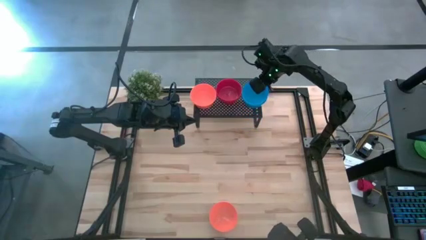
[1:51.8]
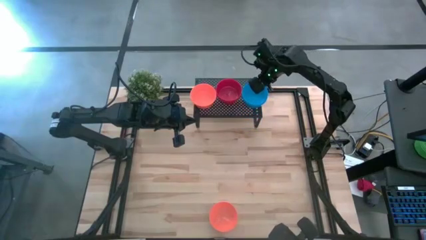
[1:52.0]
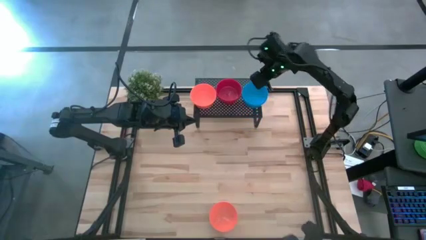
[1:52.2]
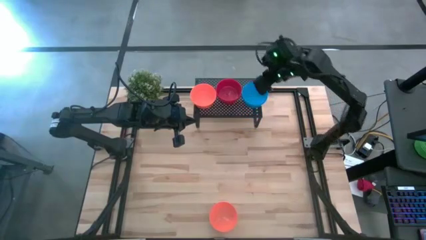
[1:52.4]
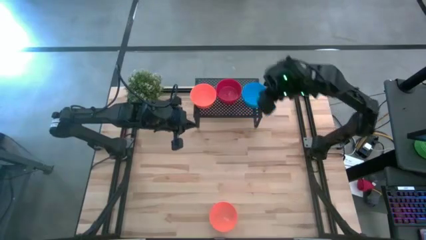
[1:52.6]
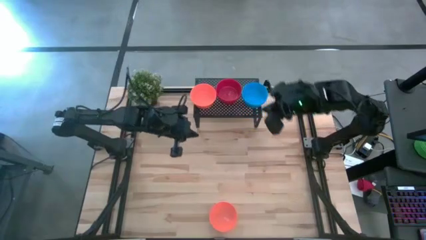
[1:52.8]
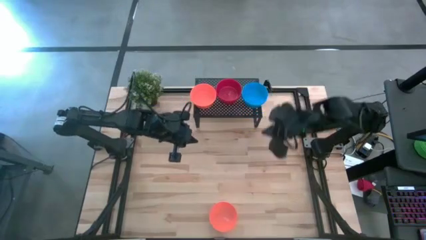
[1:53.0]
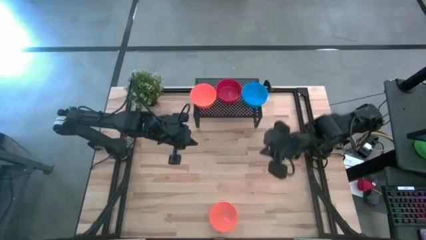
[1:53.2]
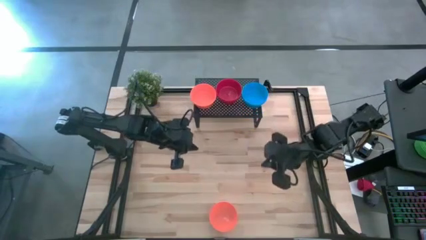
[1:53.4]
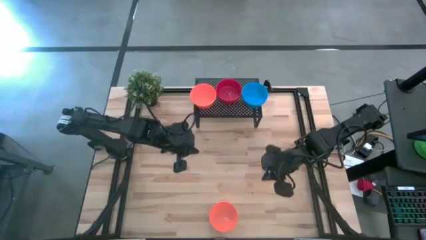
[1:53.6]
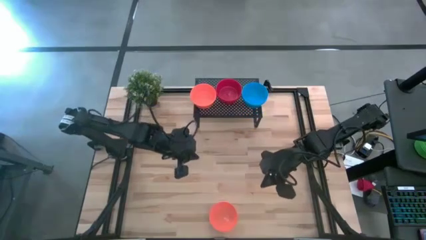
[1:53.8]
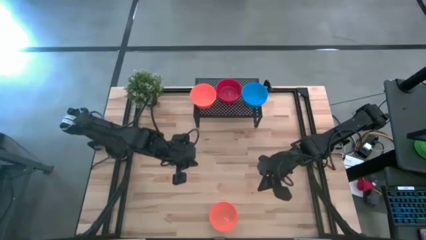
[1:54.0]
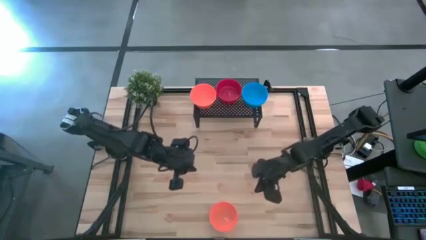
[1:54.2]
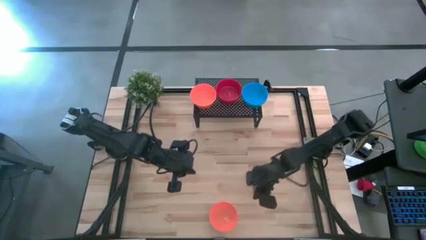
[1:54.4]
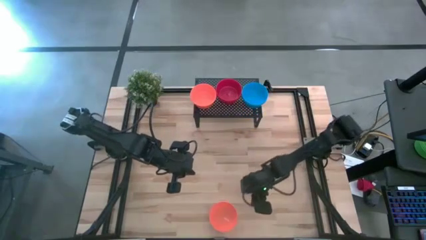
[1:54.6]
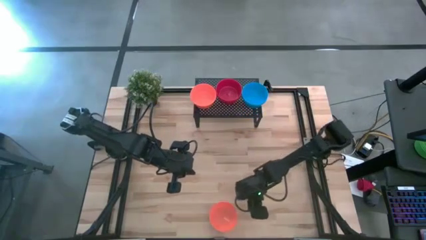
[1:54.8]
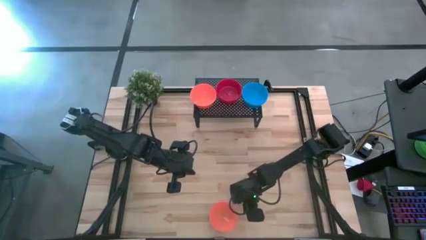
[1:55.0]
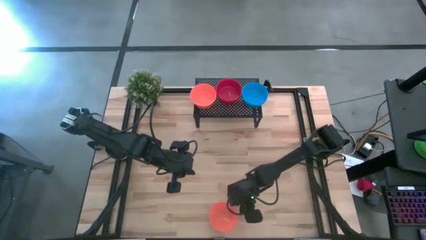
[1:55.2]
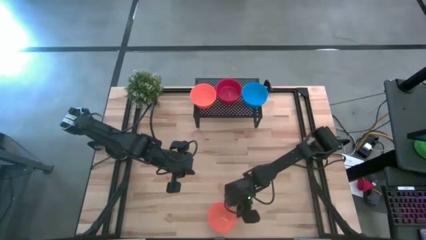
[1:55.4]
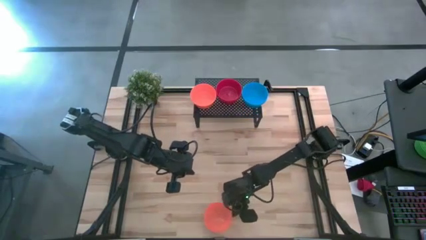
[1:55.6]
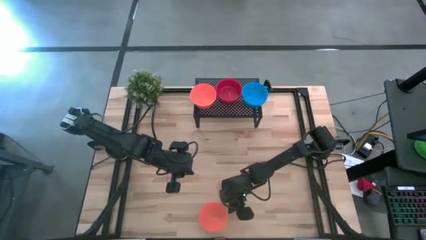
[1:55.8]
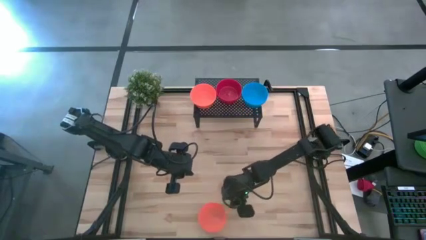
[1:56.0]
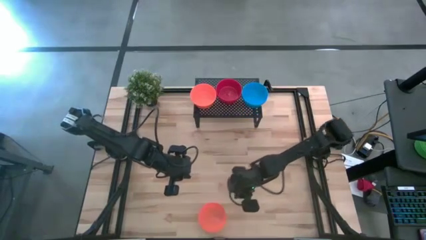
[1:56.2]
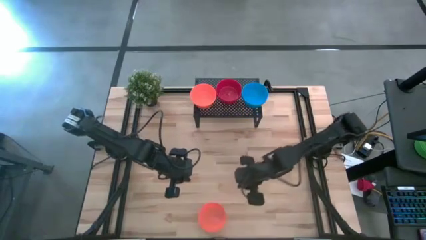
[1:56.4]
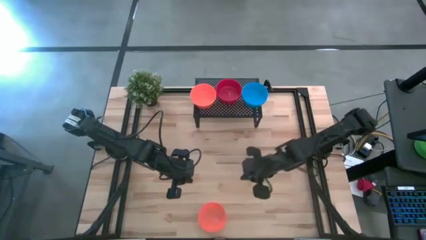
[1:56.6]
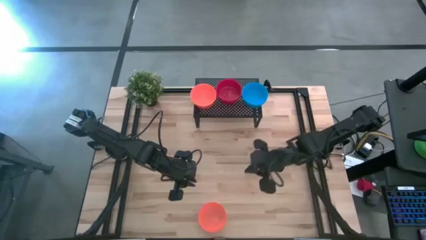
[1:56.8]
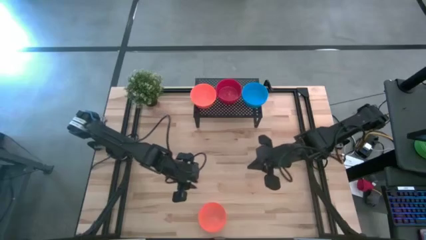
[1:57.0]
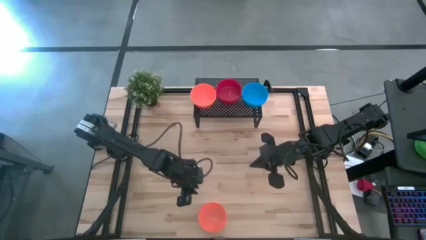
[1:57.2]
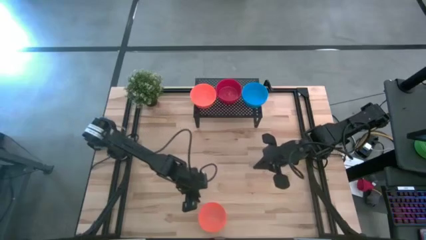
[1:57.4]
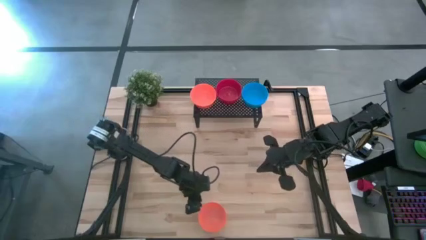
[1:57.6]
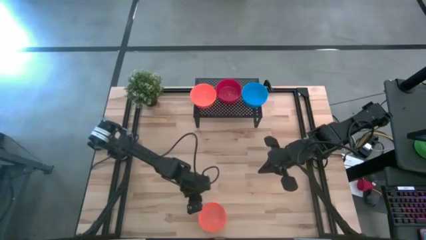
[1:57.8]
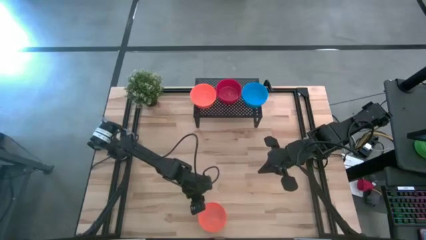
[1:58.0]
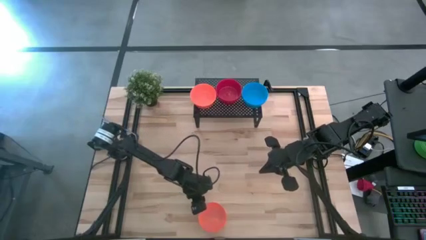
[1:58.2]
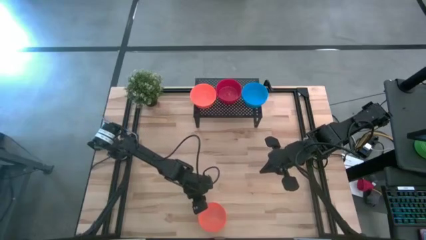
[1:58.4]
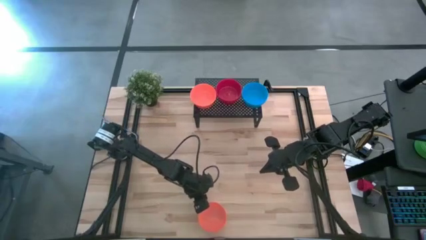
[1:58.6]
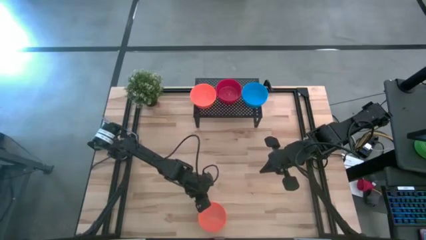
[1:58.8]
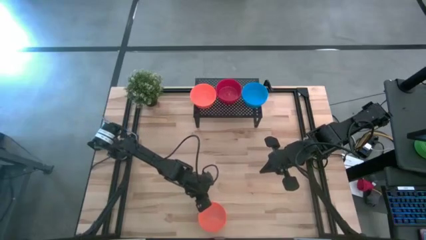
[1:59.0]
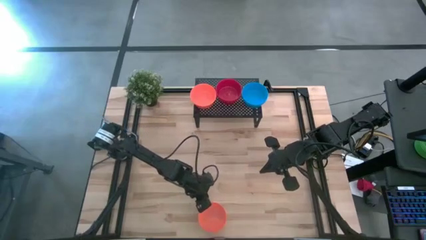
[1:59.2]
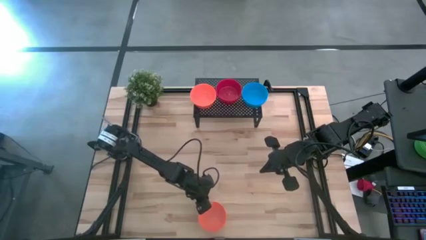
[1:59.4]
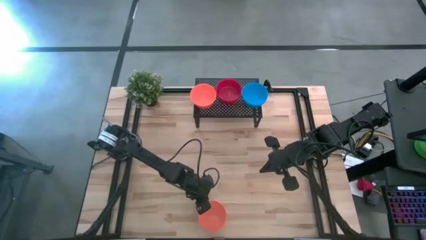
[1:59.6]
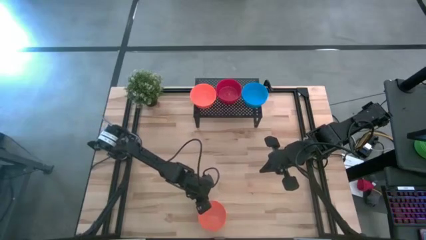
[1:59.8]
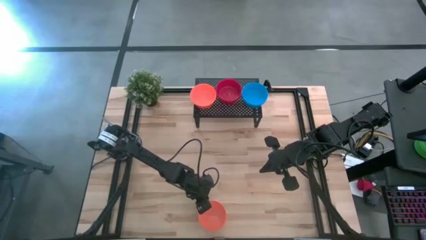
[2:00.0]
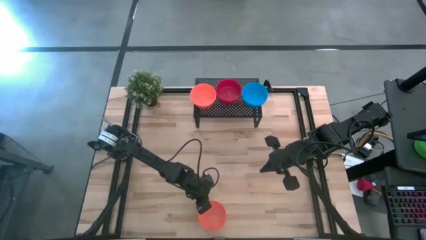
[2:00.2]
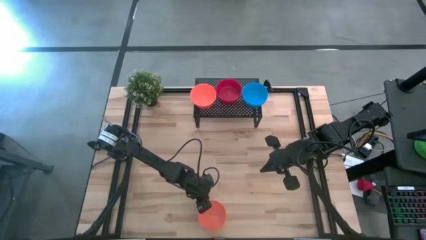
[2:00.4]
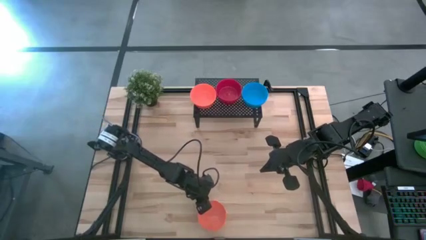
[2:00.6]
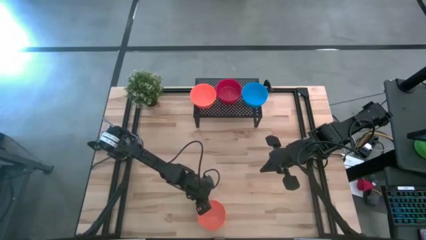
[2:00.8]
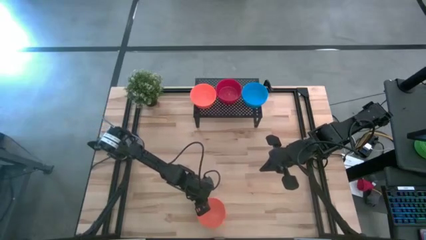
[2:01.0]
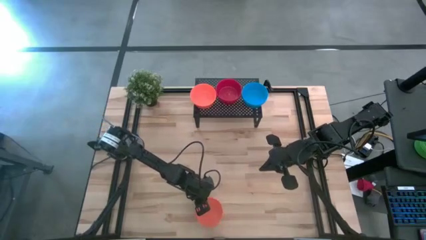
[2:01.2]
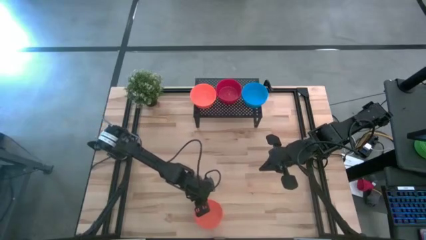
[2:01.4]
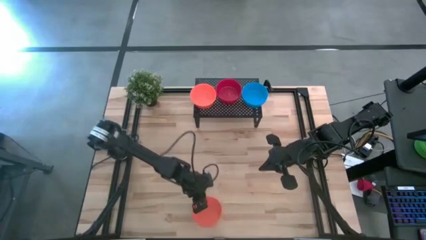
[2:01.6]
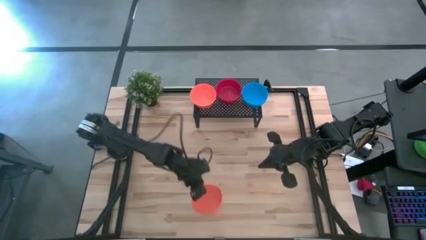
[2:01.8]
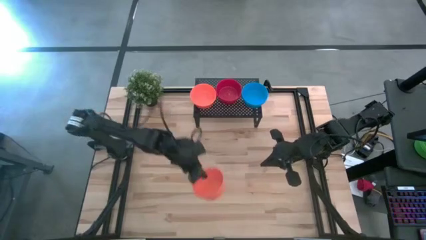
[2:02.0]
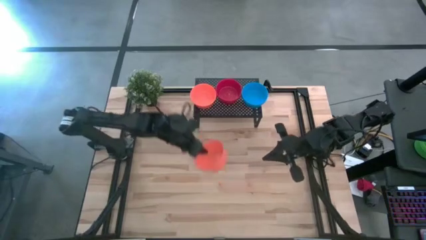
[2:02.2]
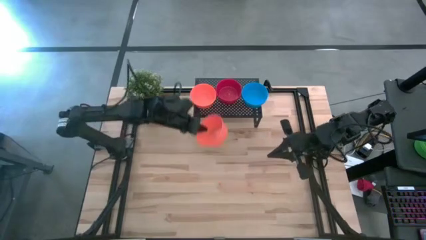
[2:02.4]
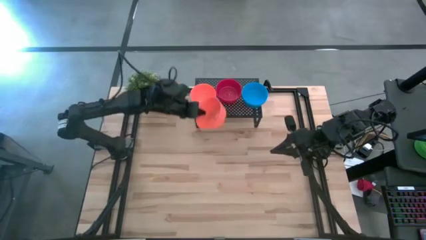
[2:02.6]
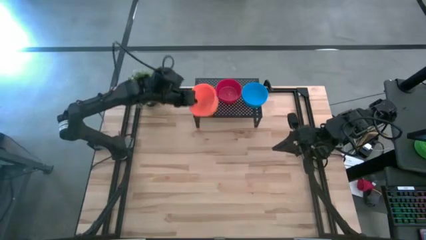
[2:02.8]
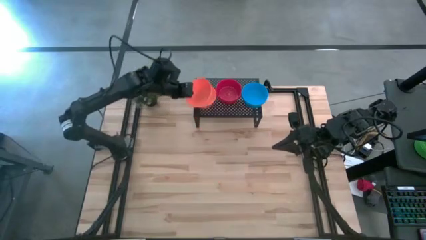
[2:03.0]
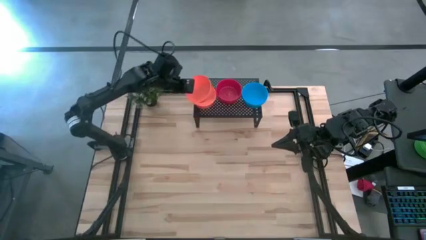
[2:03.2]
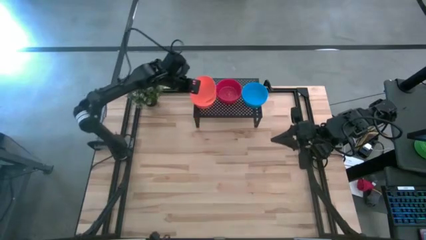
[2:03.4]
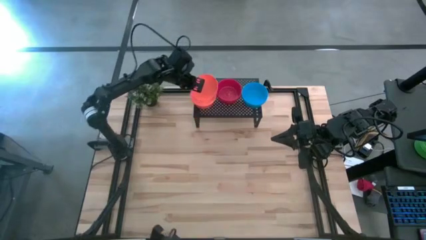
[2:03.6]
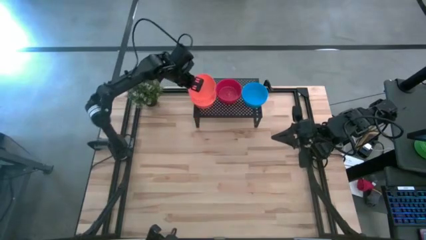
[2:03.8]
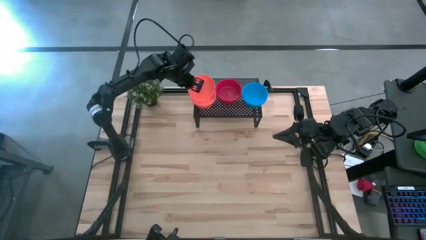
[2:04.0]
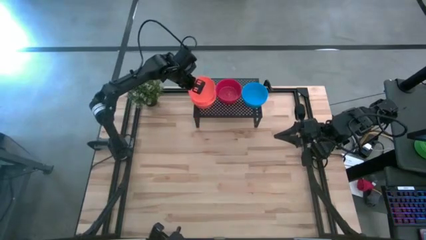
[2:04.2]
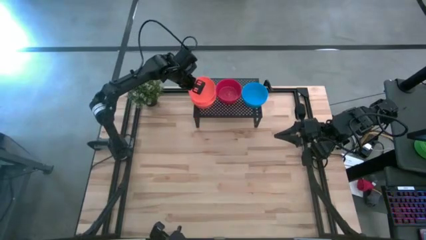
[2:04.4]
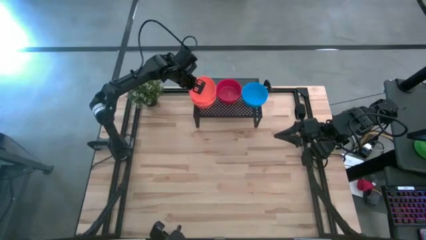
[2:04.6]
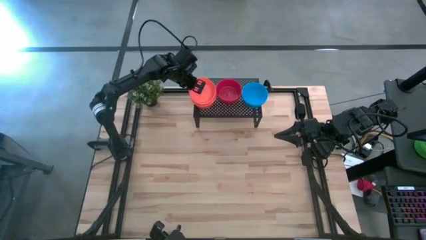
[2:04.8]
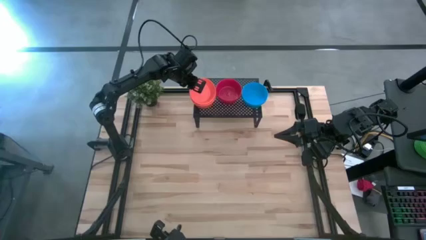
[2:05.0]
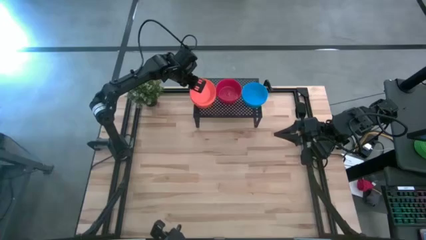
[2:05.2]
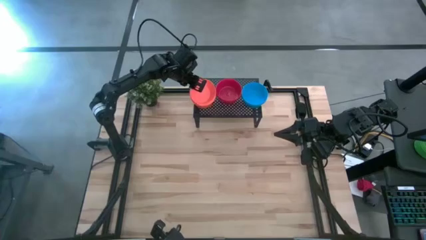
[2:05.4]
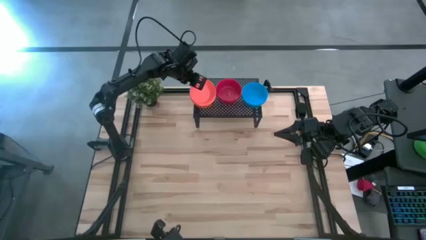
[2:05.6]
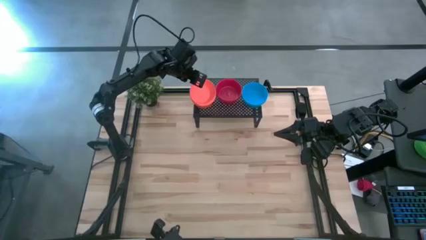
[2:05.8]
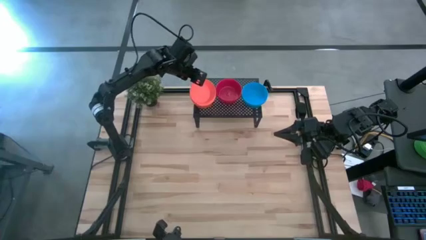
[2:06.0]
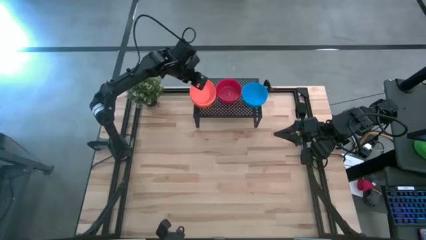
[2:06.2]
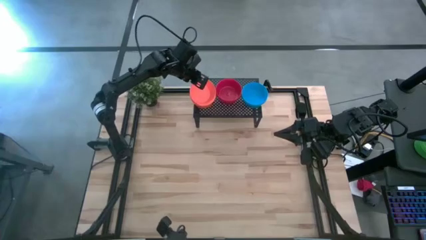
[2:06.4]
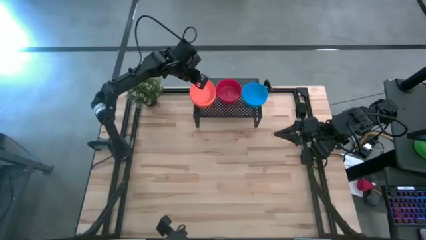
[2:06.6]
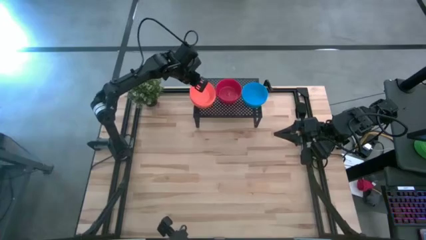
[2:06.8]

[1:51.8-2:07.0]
Task: Pick & Place Mini bowls
Stack the orange bowl on top of the orange bowl on the shelf
